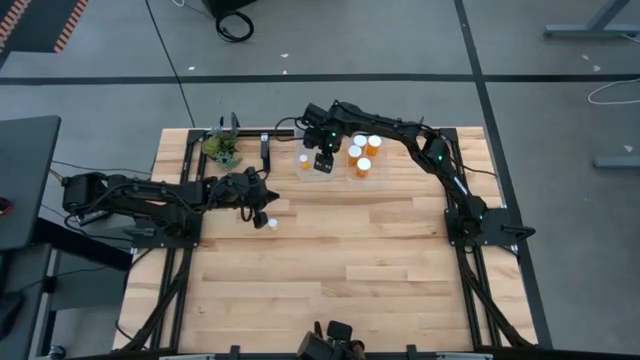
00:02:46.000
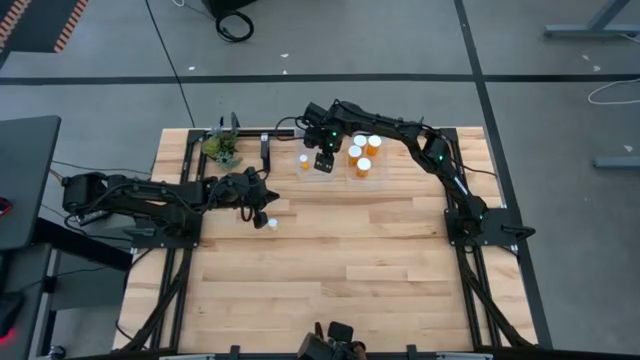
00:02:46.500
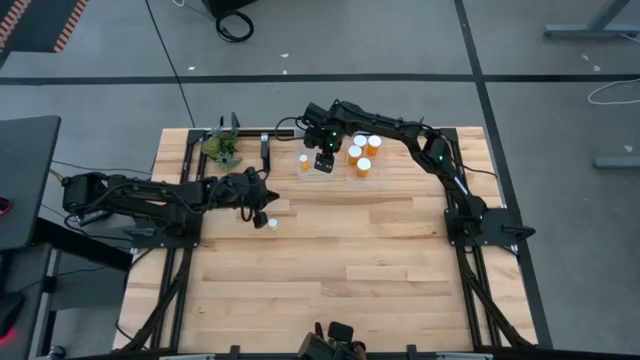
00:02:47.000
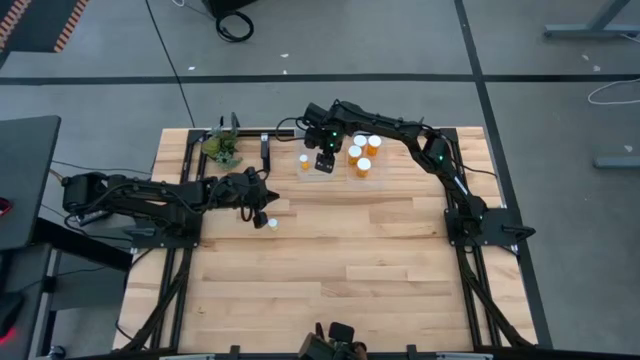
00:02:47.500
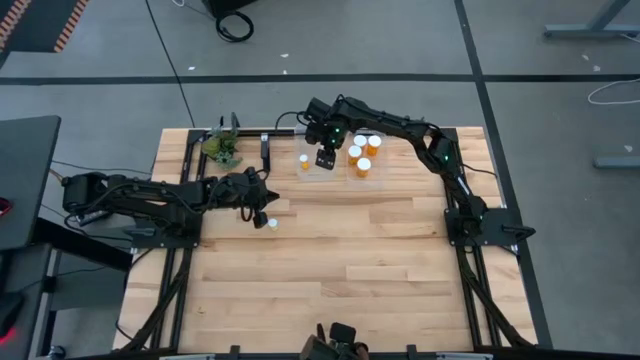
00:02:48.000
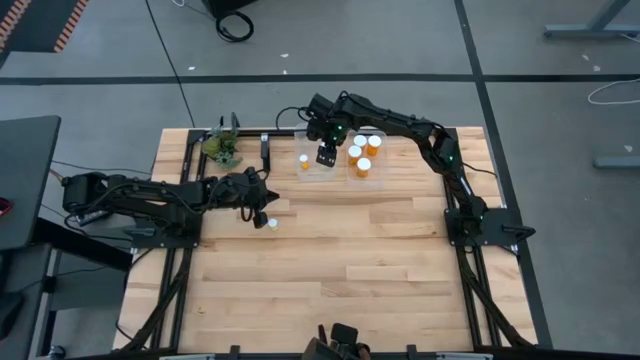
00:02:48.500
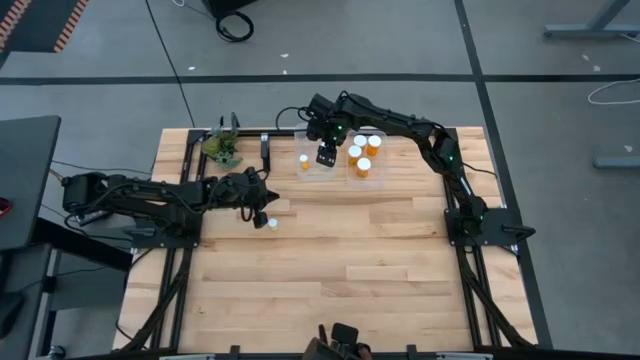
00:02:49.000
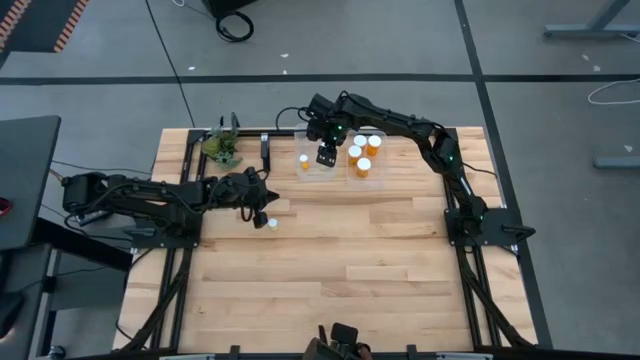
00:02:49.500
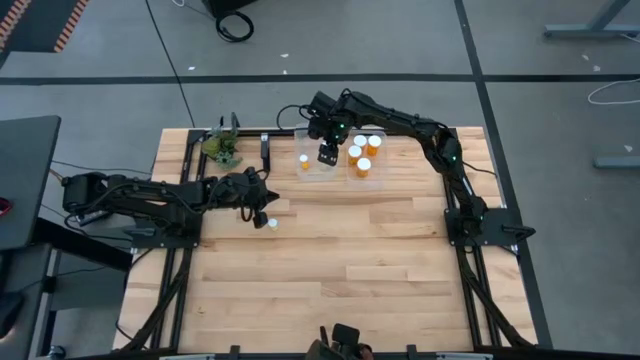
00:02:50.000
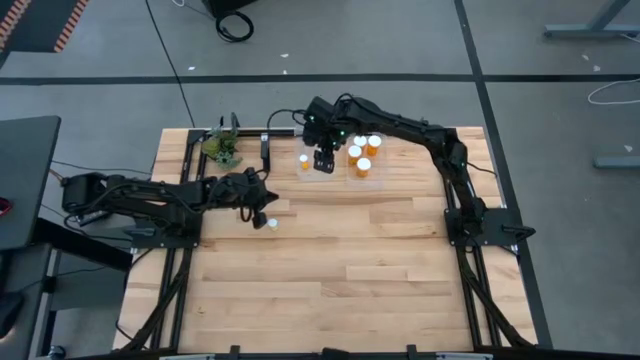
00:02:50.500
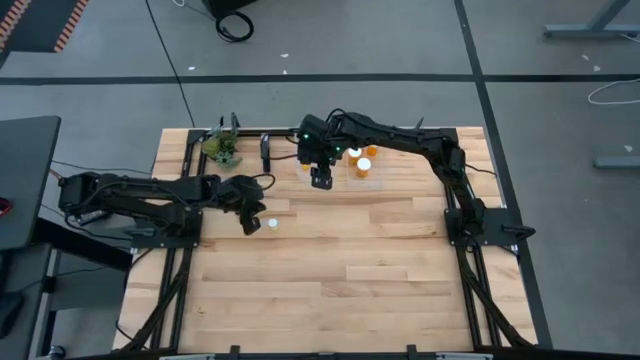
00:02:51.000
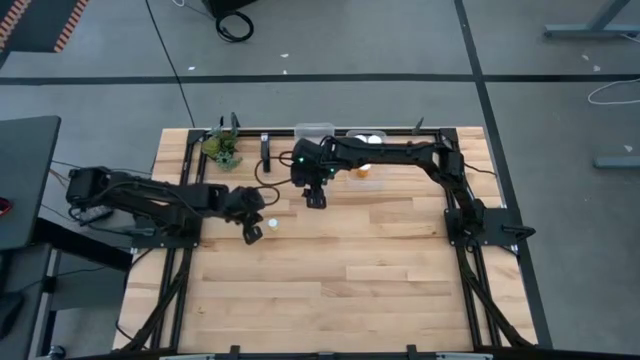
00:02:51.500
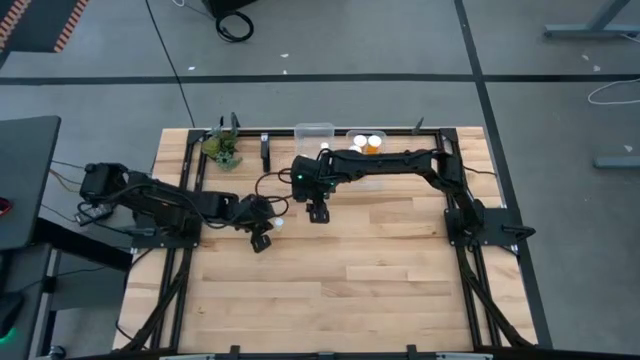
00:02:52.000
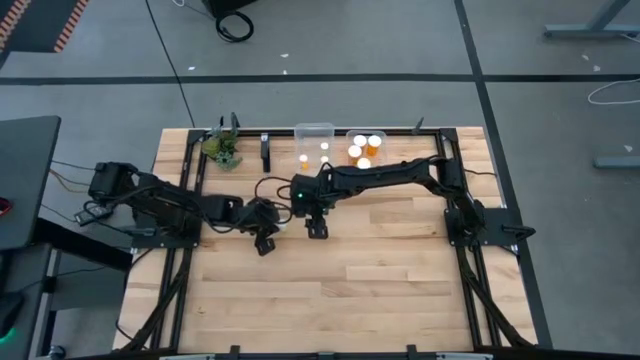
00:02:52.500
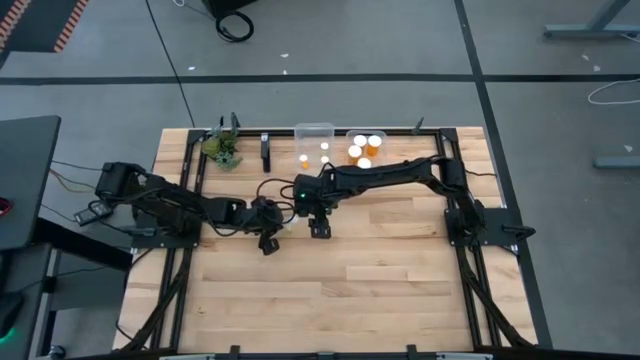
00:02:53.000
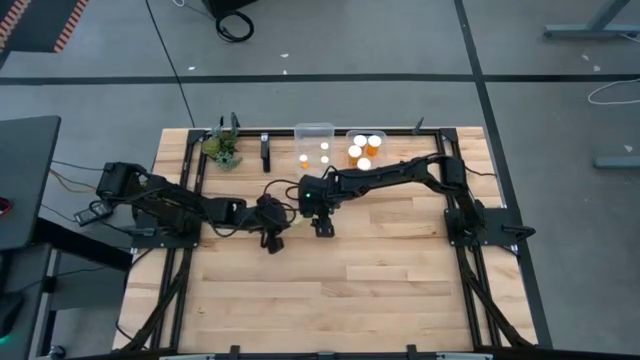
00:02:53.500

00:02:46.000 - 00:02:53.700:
Task: Pick and place medicine bottles into bin by pill shape (circle, oval)
Put the small yellow pill into the left transparent bin

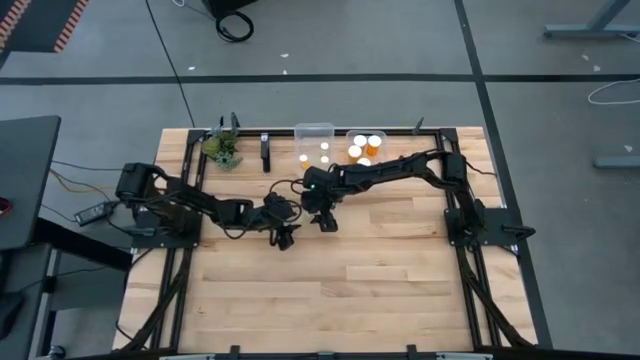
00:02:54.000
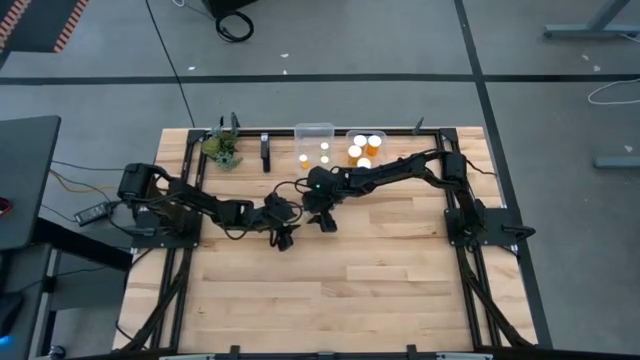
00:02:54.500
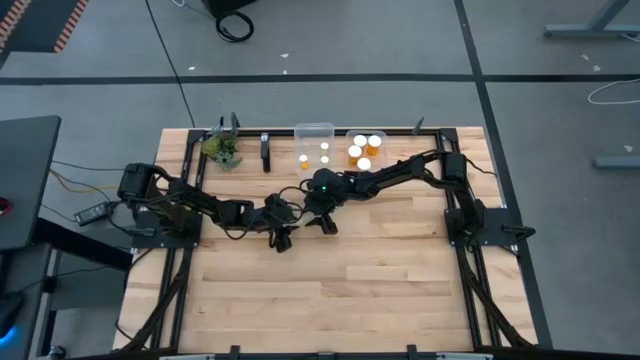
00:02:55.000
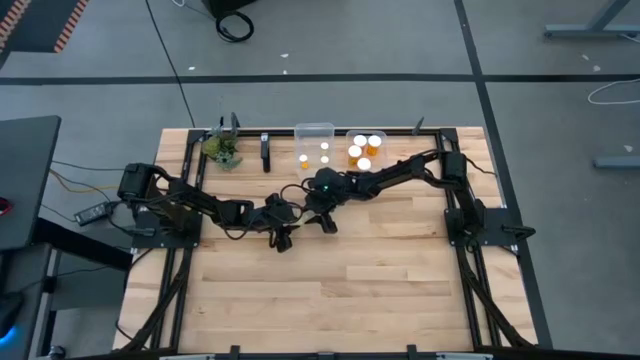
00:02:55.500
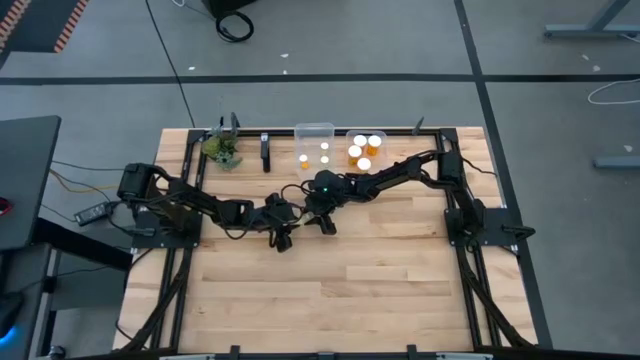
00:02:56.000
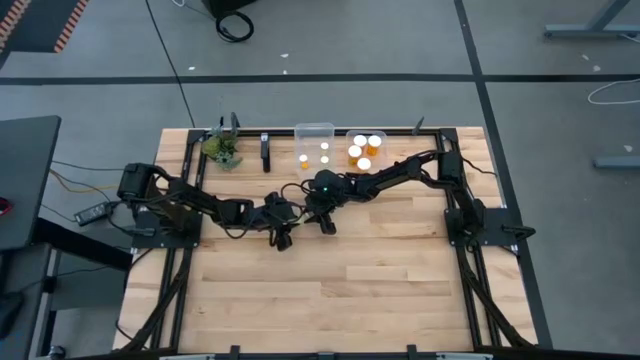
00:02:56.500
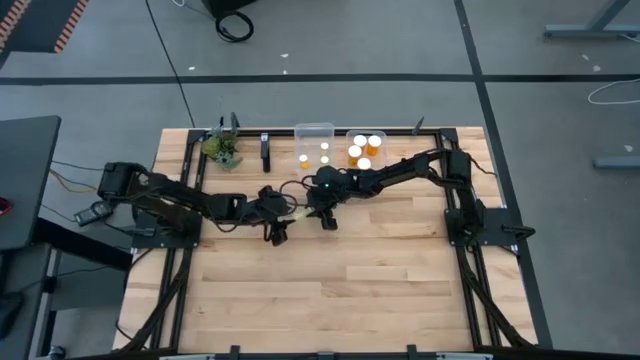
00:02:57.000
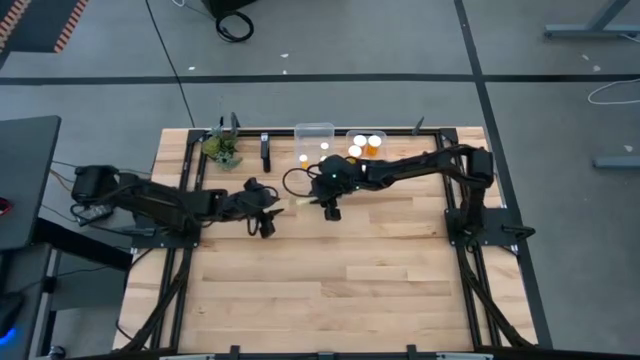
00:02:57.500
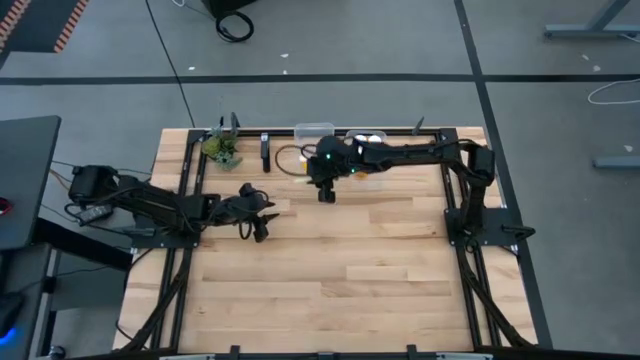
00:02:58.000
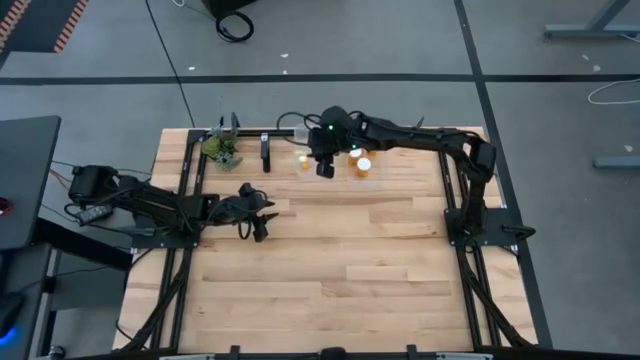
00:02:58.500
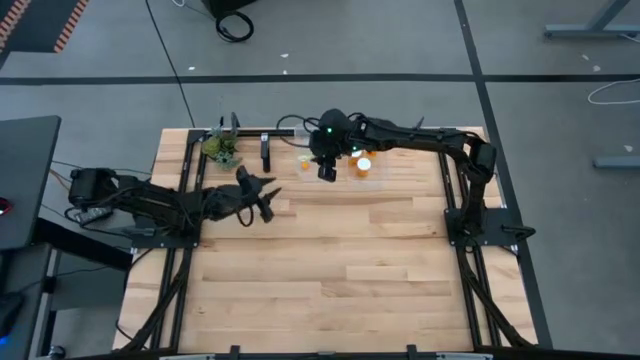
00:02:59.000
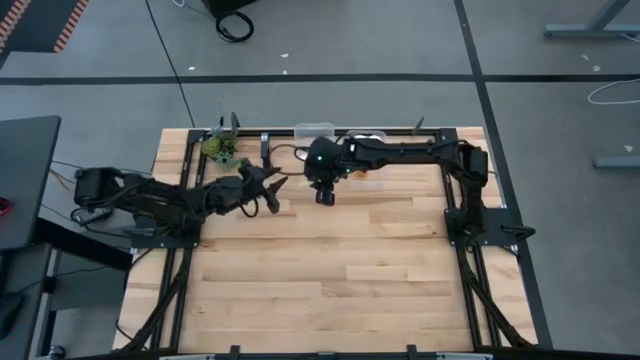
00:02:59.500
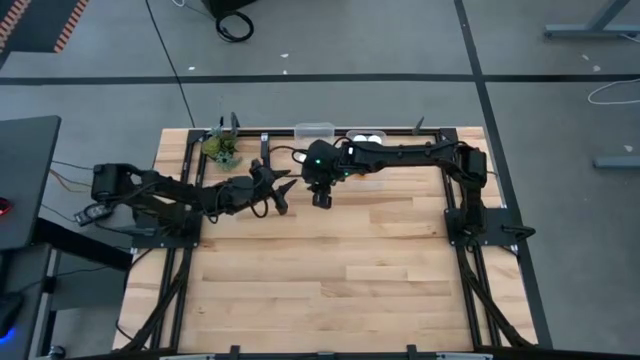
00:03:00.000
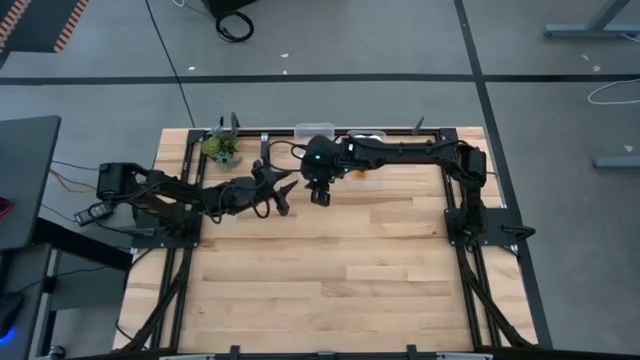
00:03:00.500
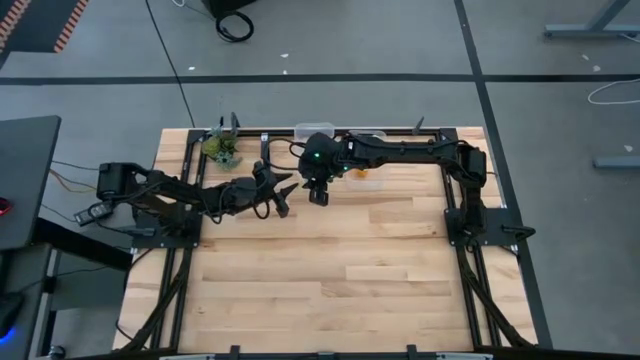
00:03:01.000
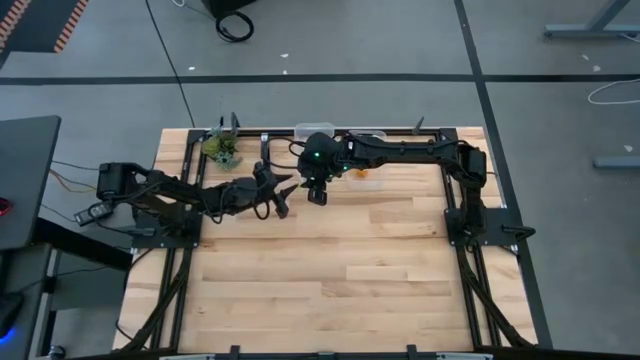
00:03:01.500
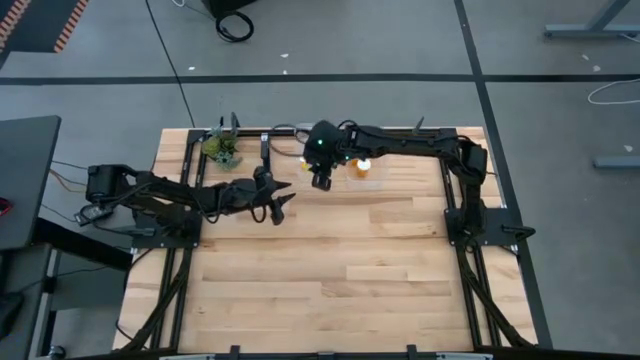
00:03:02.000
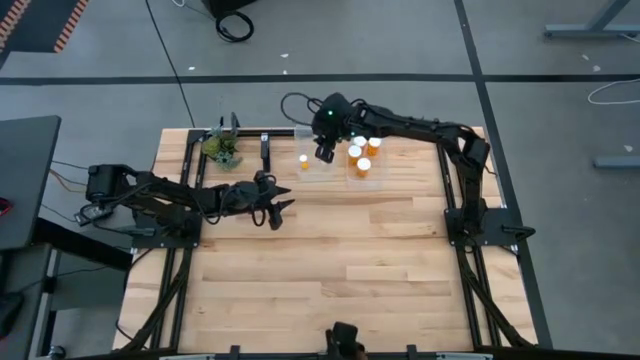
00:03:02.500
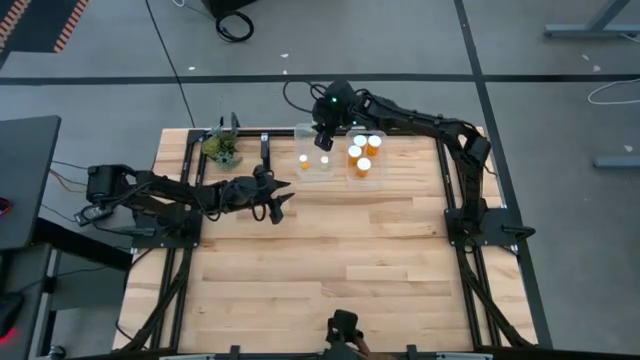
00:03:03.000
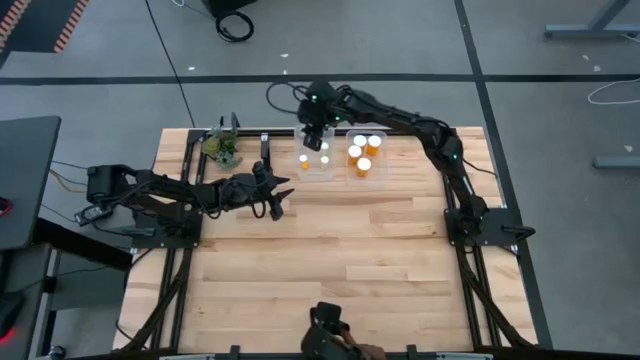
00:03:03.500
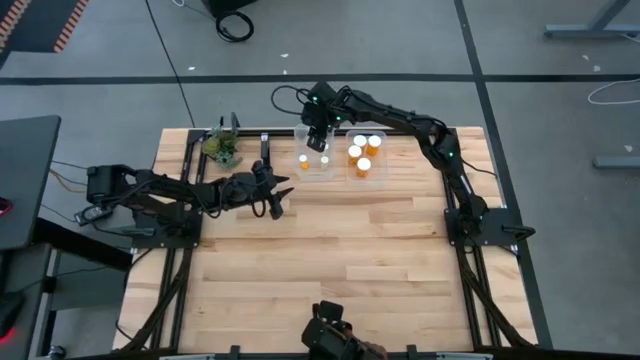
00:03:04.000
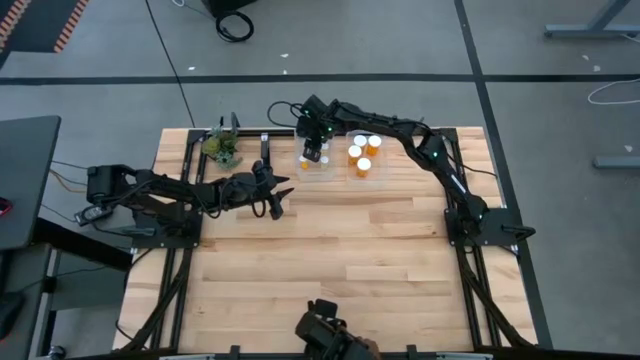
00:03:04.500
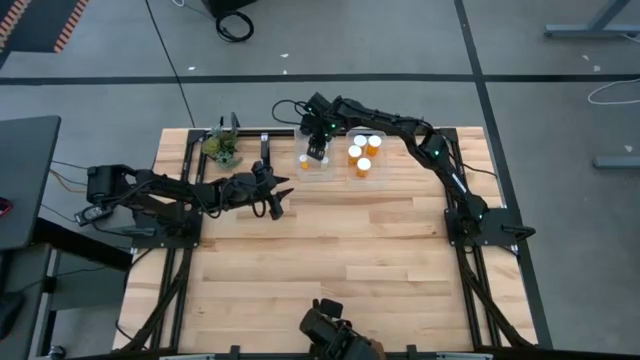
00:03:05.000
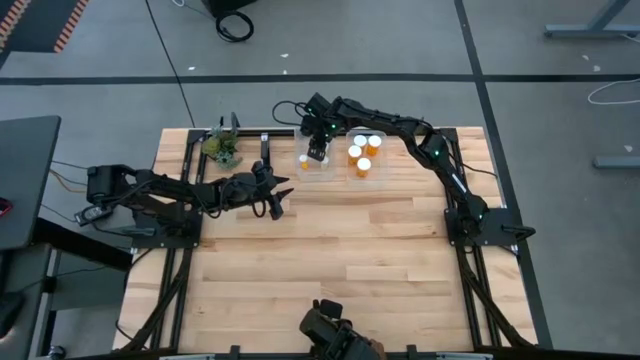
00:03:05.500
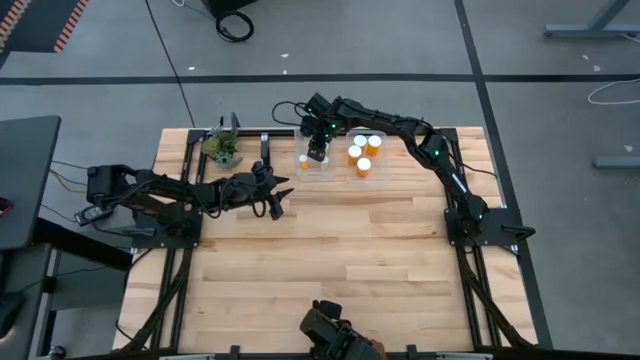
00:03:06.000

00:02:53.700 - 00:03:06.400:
Put the small yellow pill into the left transparent bin

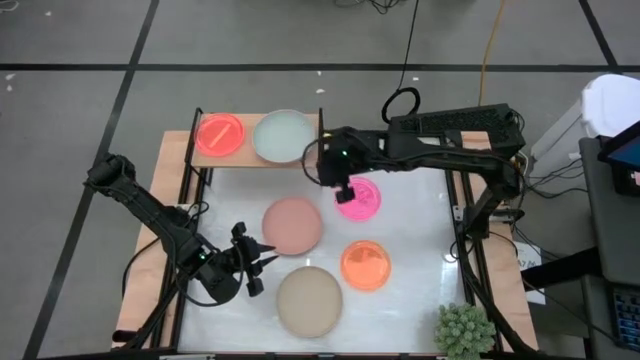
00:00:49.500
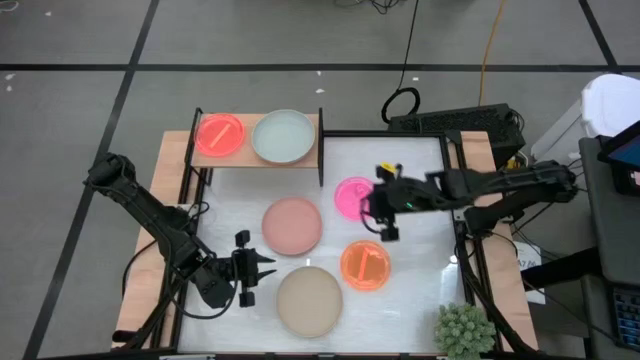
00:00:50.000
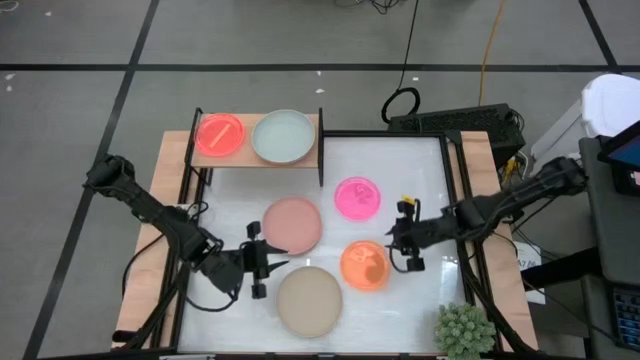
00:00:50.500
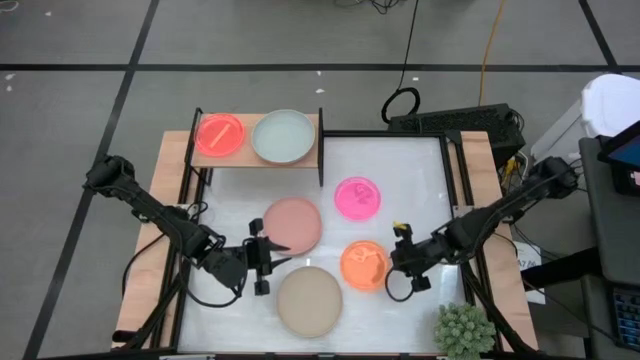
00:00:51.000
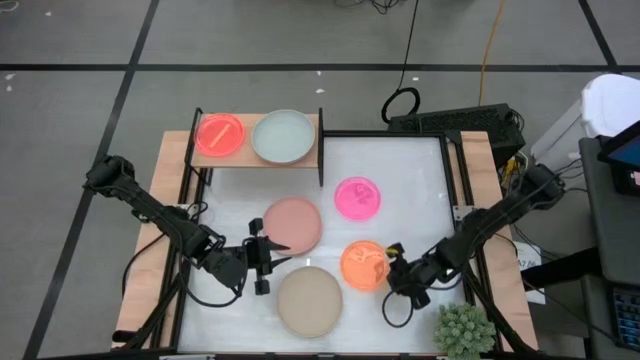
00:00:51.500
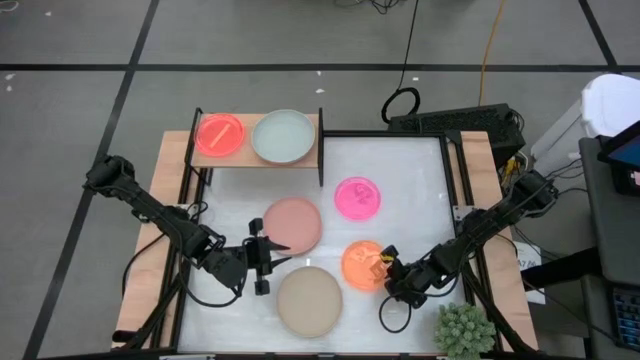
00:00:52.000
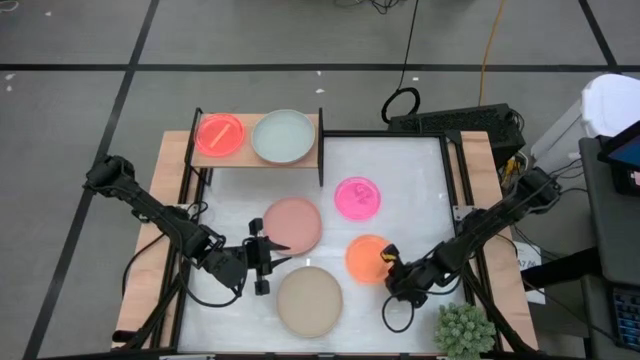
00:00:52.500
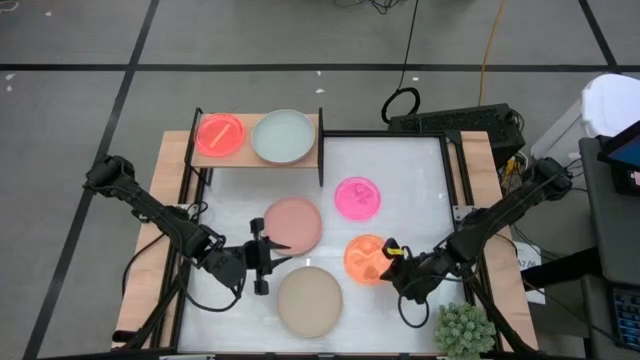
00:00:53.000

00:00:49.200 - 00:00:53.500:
Task: Place and stack plates onto a shelf
Stack the small orange plate on top of the small orange plates on the shelf
